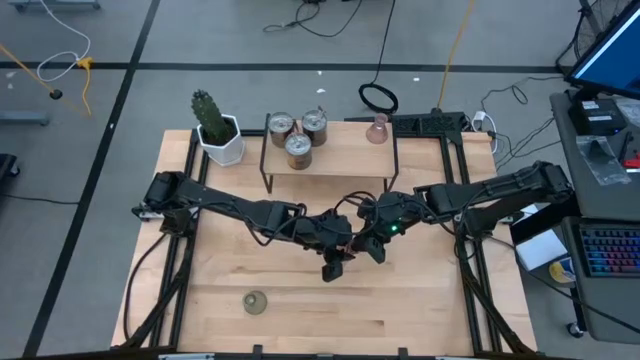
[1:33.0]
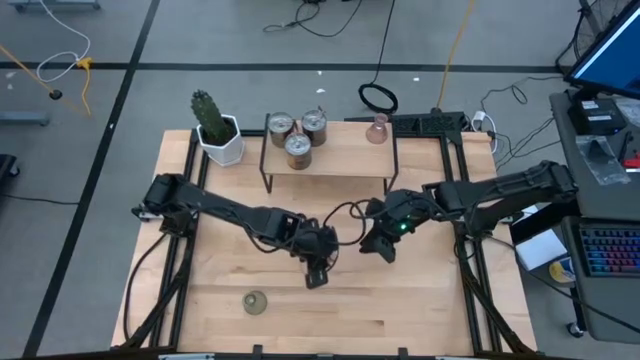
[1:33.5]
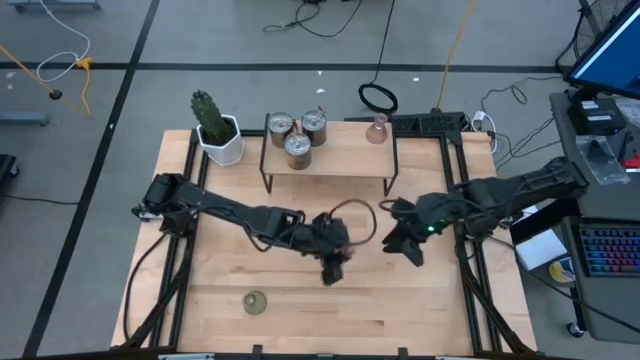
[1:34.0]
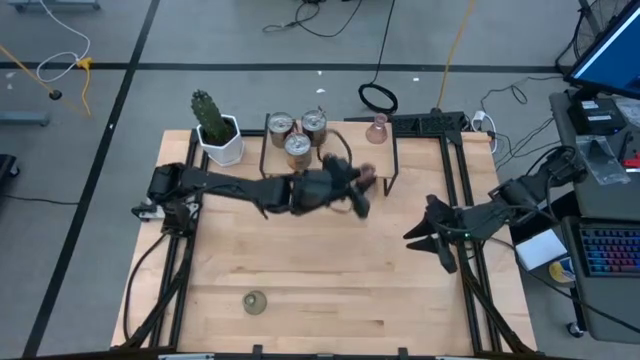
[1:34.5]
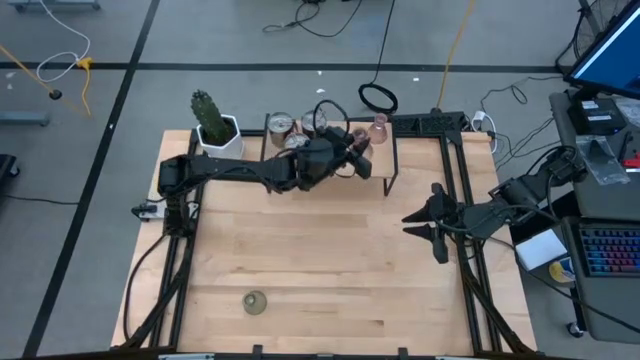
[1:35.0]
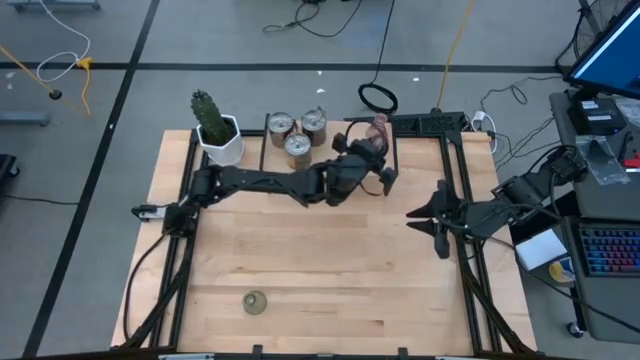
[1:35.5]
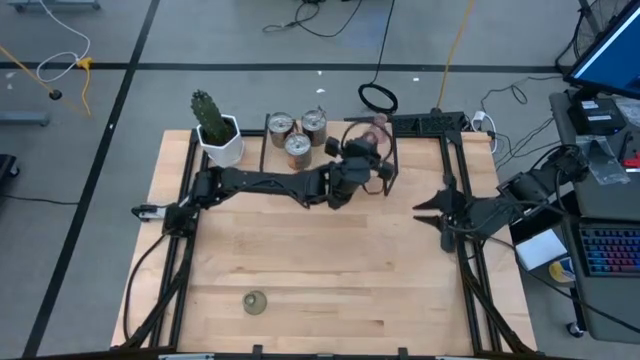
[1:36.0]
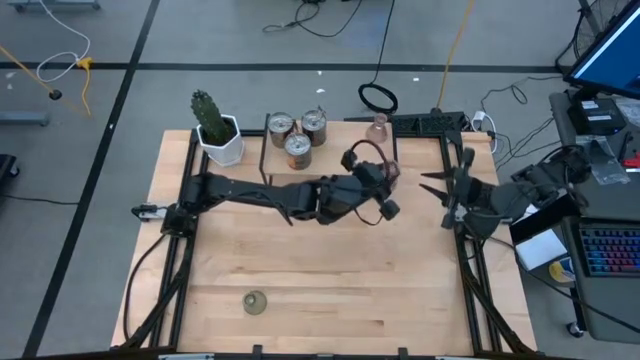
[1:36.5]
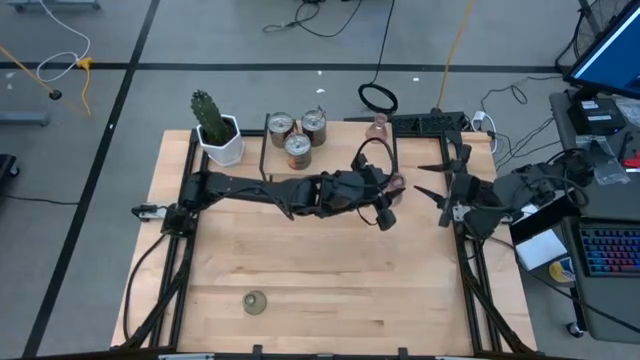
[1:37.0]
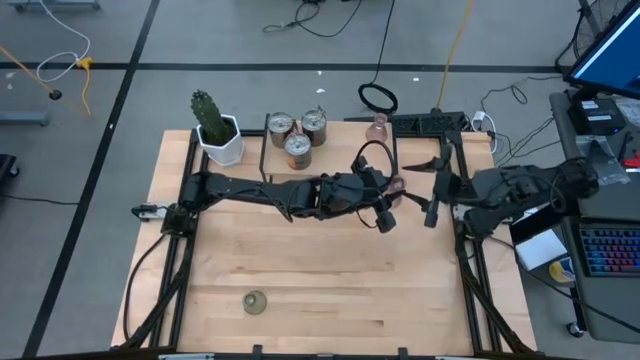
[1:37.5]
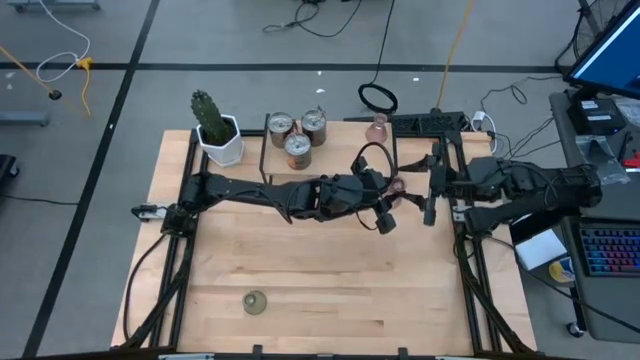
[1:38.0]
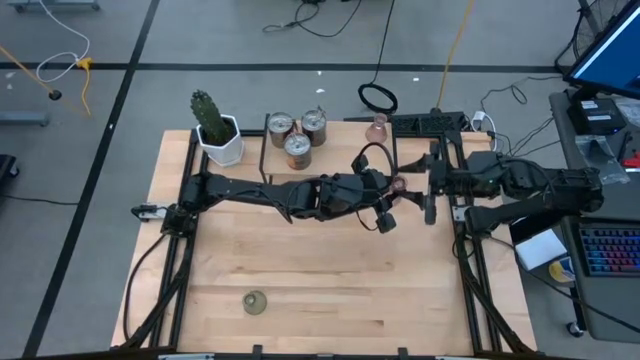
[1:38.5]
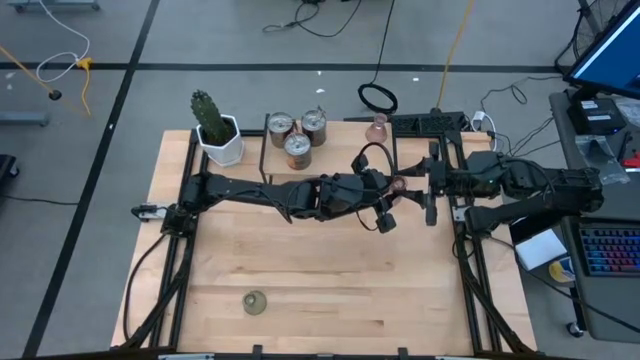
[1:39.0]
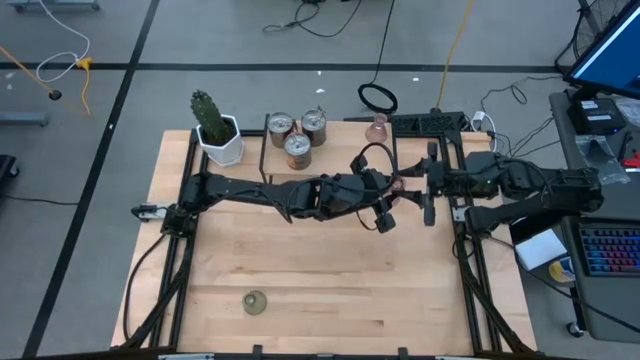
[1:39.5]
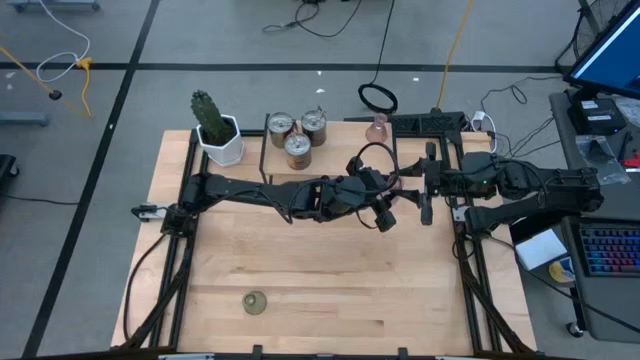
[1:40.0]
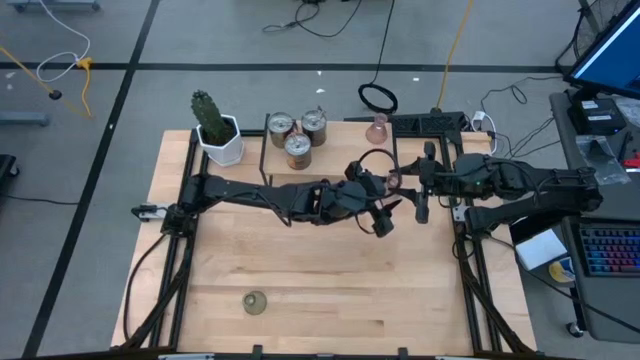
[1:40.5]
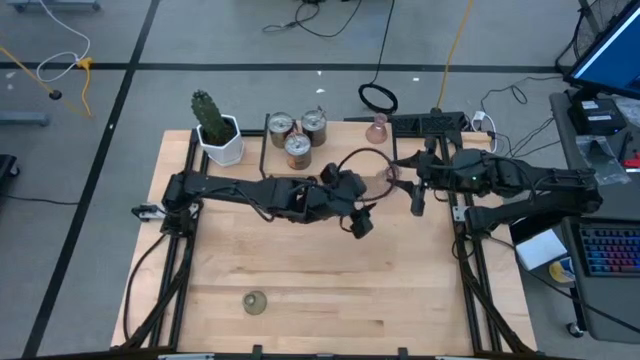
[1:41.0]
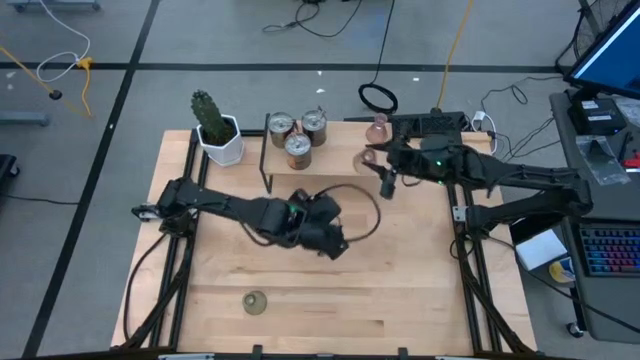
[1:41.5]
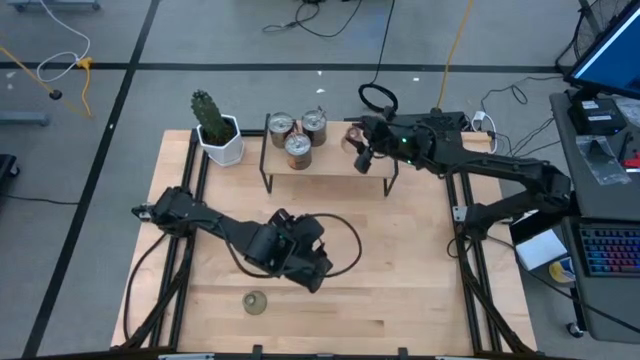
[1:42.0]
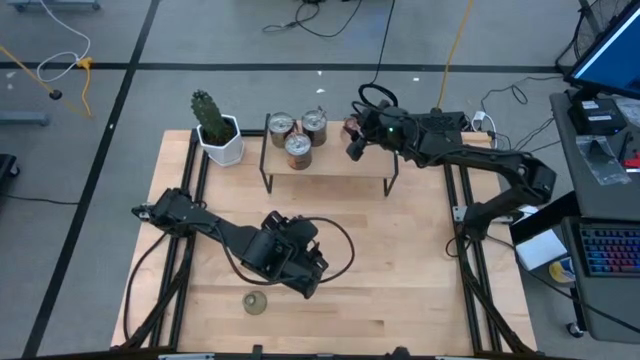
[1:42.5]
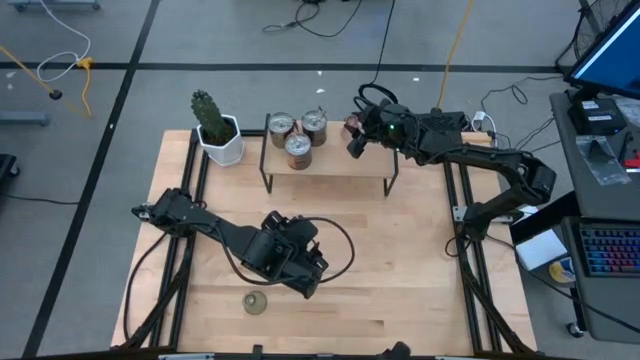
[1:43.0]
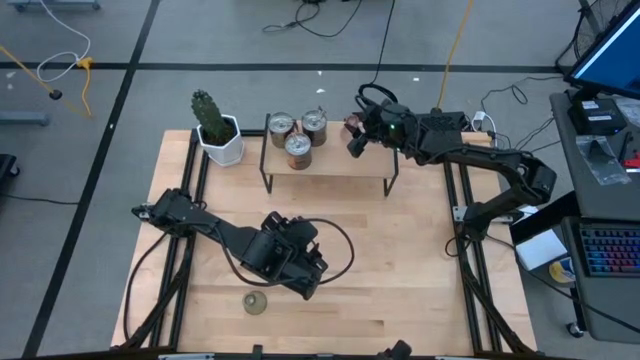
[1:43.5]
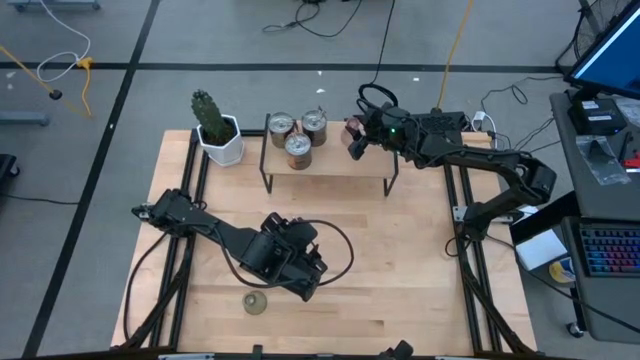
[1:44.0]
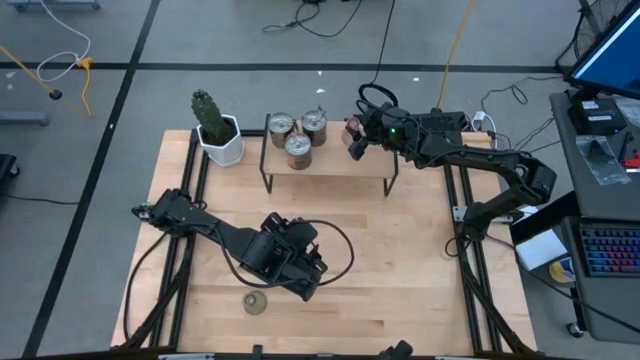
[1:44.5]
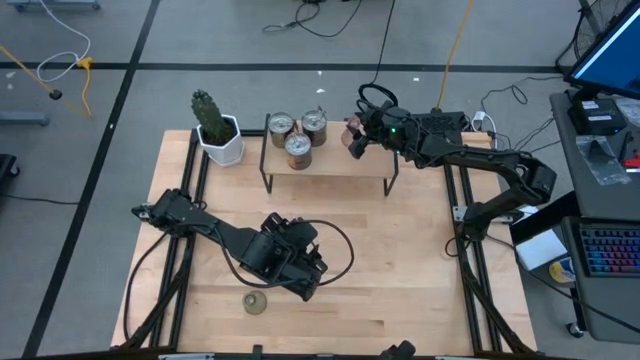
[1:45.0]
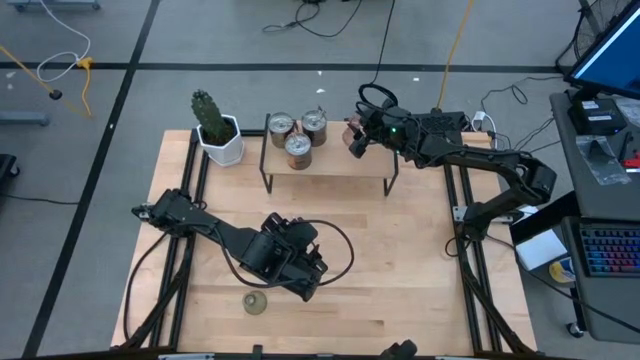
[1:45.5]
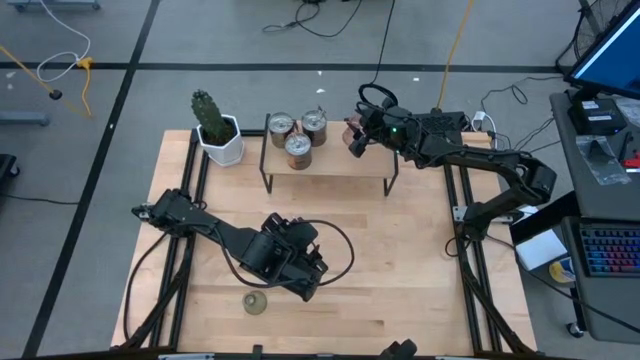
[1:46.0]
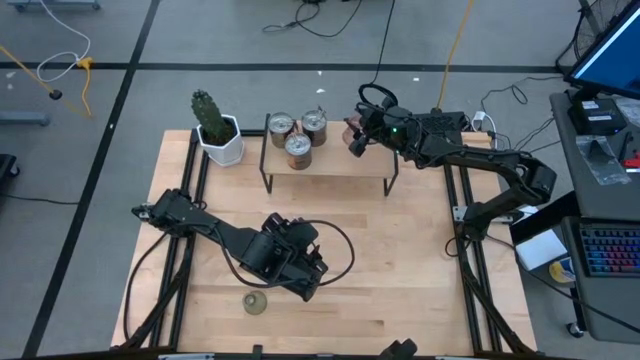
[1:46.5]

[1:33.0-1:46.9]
Task: Pick & Place candle stick holders
Put the pink glass candle holder on the shelf

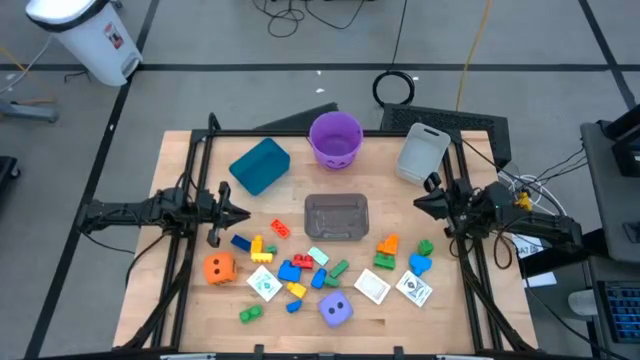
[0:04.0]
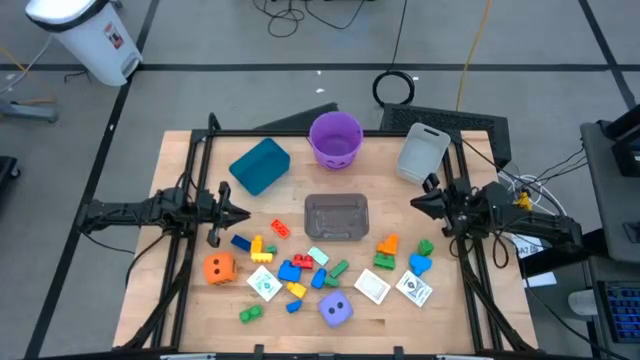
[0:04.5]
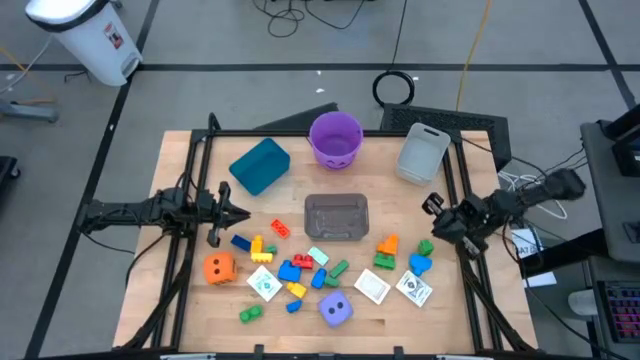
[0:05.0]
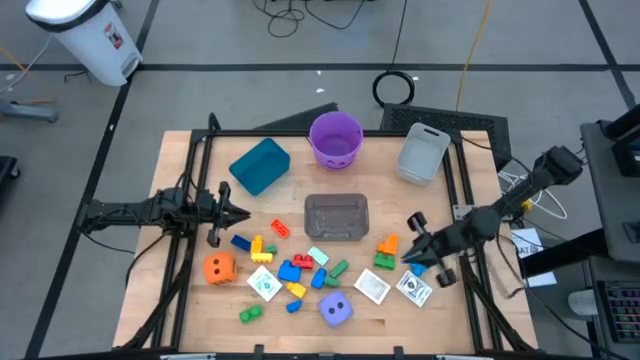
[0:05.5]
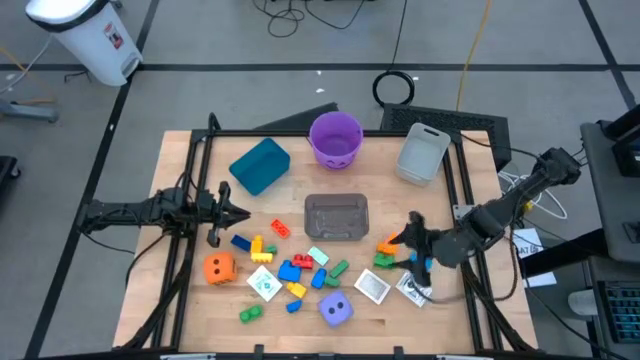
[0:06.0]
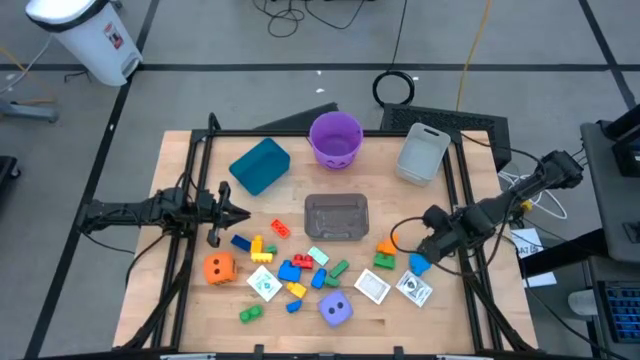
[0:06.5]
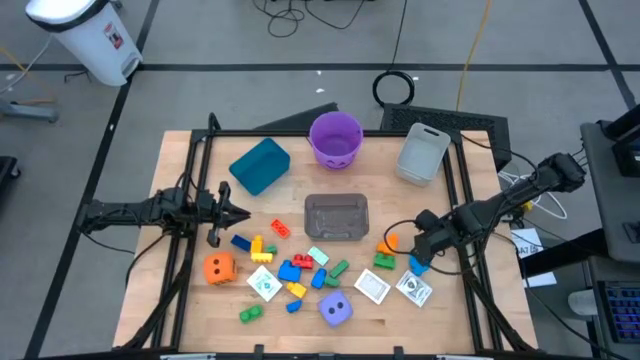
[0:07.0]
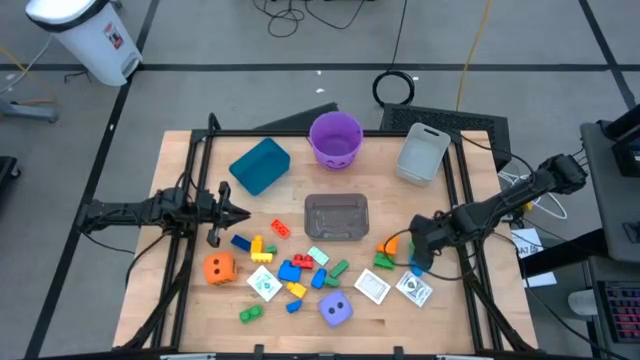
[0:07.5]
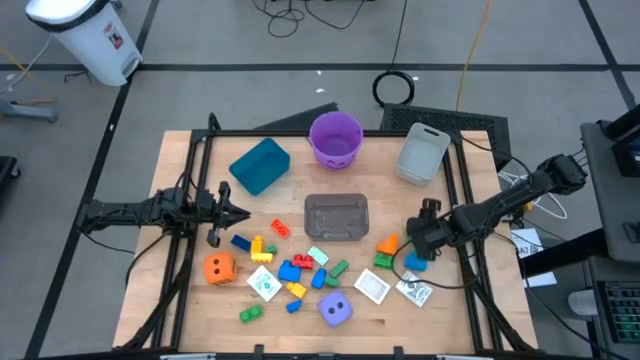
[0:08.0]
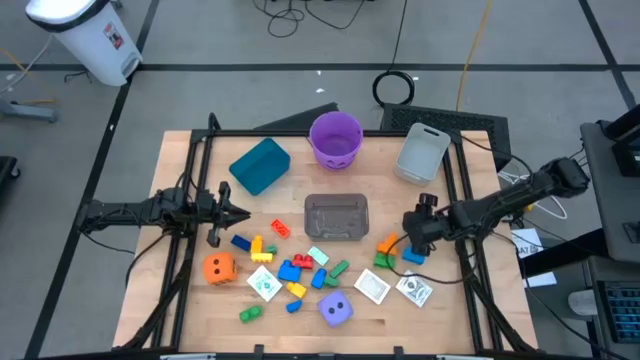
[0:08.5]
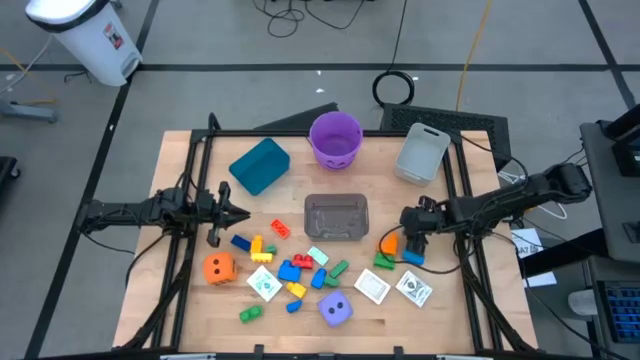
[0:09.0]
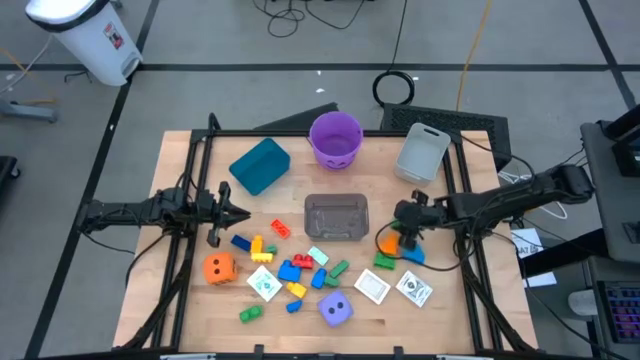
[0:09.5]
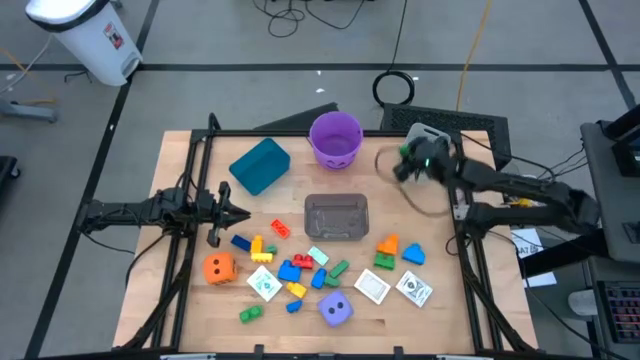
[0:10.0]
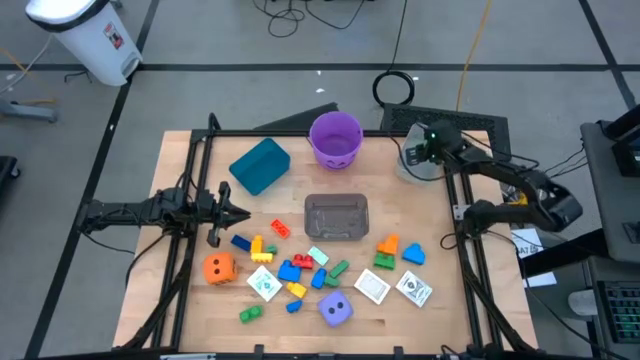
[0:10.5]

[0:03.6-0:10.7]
Task: Pick & Place Toys
Put the top green game piece into the white bin
